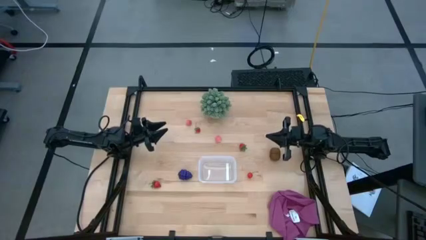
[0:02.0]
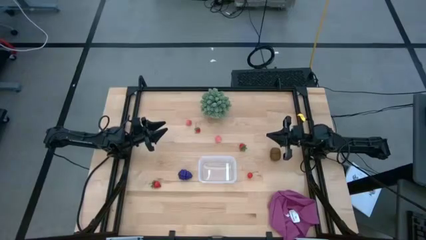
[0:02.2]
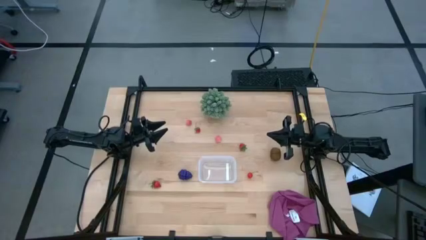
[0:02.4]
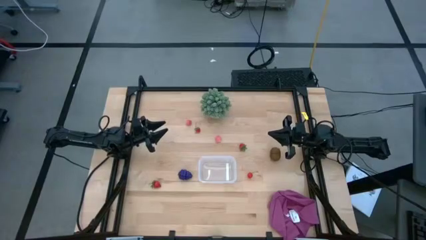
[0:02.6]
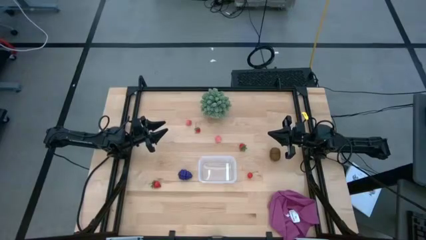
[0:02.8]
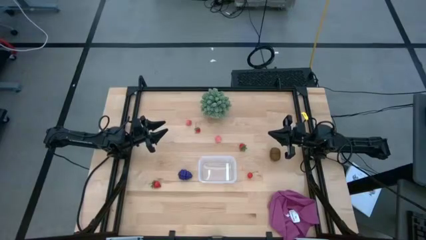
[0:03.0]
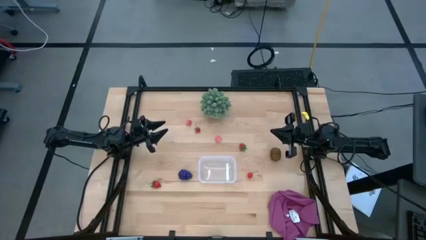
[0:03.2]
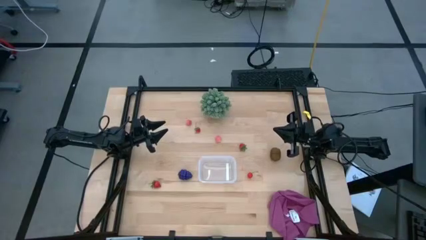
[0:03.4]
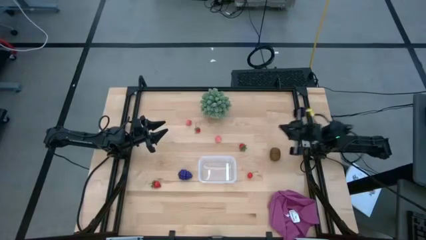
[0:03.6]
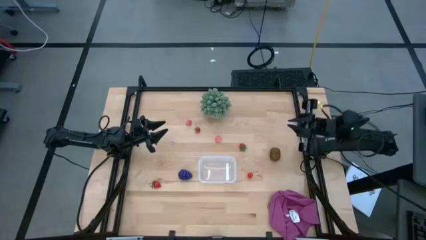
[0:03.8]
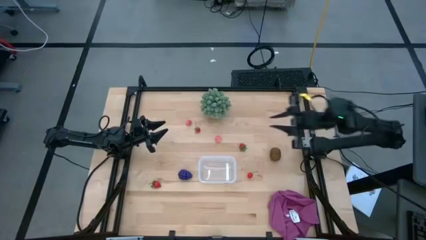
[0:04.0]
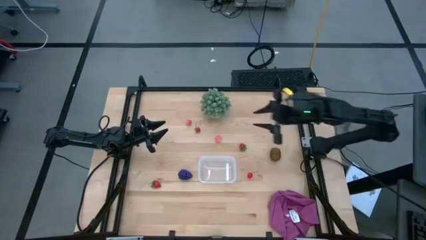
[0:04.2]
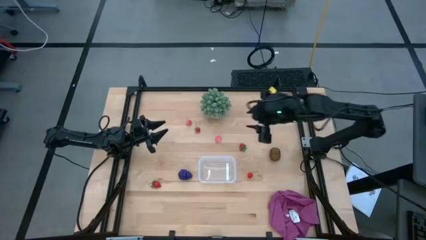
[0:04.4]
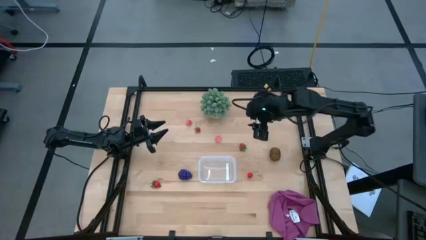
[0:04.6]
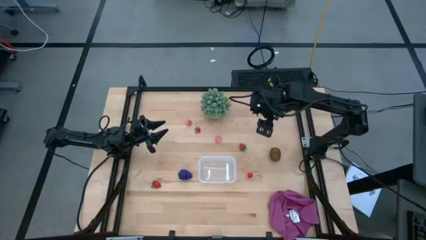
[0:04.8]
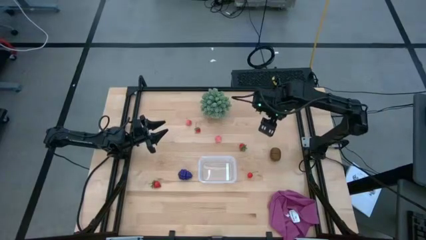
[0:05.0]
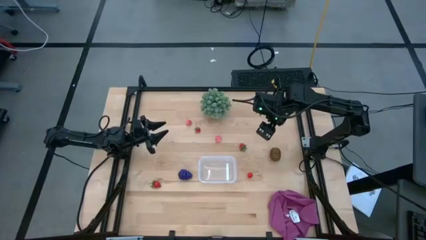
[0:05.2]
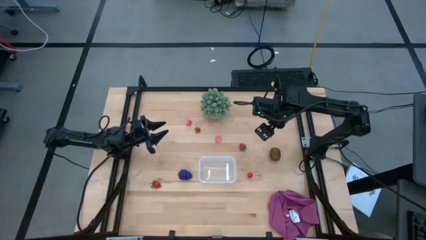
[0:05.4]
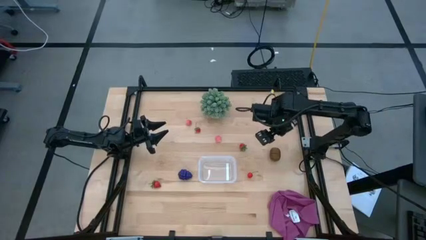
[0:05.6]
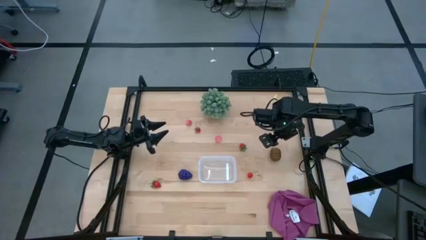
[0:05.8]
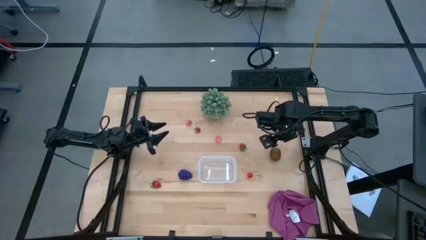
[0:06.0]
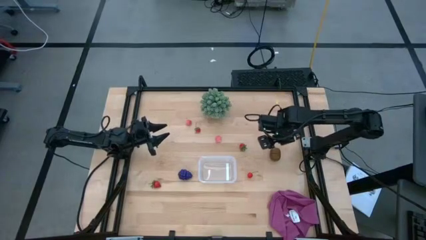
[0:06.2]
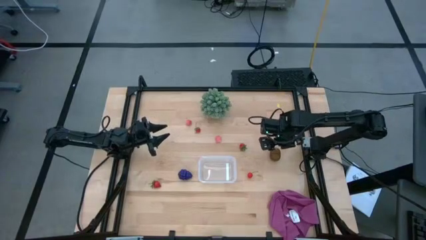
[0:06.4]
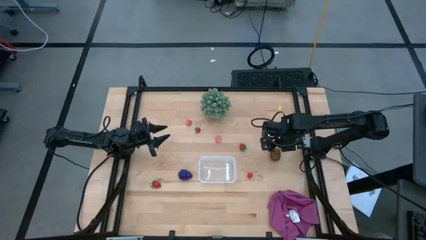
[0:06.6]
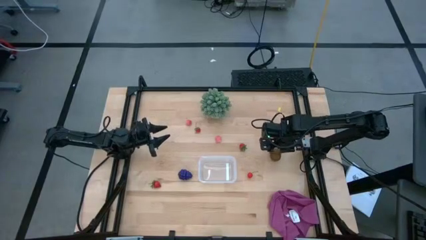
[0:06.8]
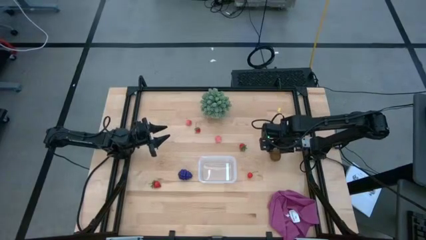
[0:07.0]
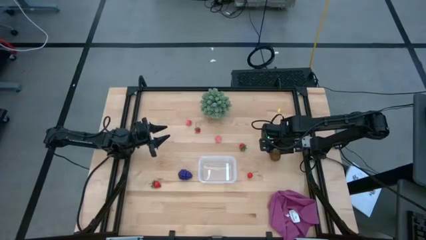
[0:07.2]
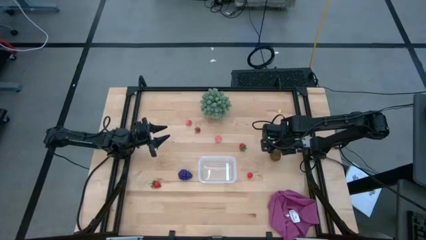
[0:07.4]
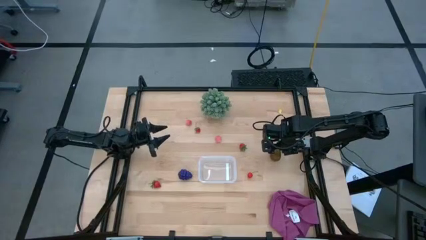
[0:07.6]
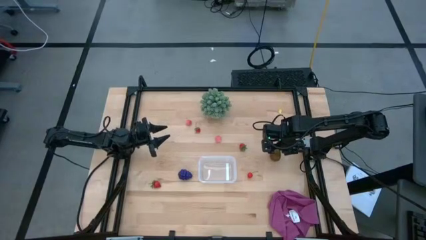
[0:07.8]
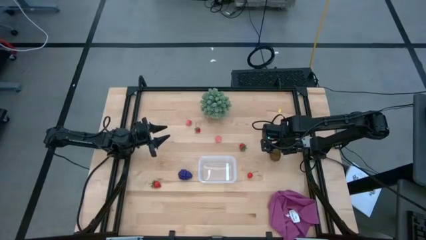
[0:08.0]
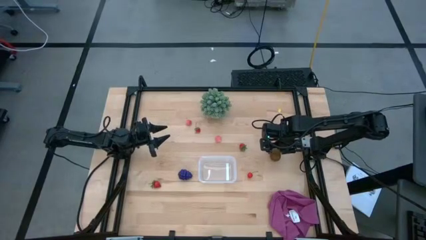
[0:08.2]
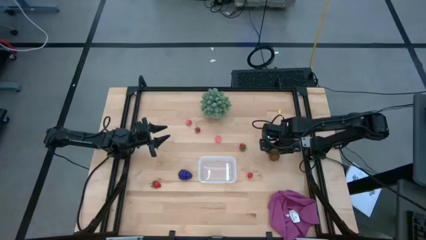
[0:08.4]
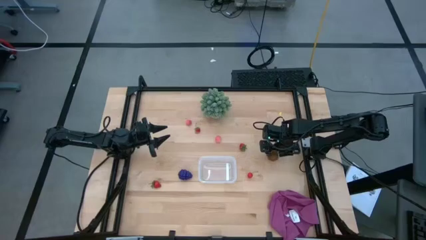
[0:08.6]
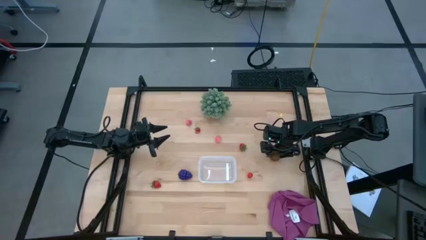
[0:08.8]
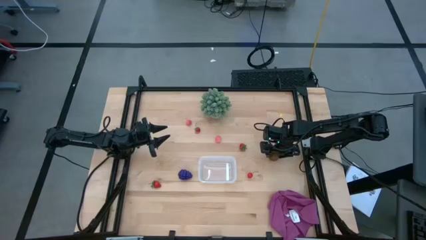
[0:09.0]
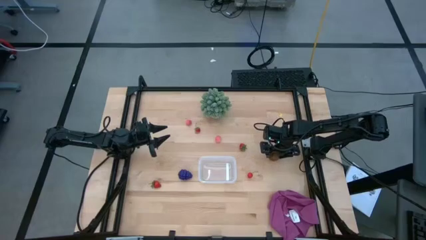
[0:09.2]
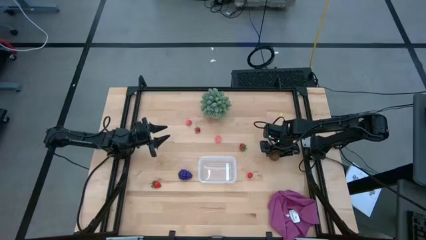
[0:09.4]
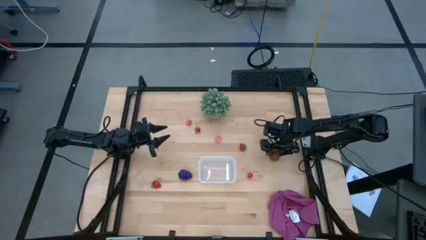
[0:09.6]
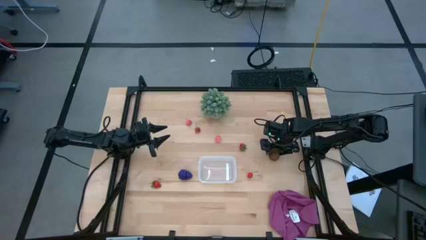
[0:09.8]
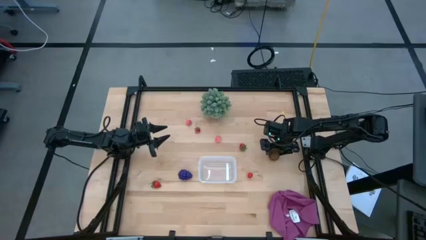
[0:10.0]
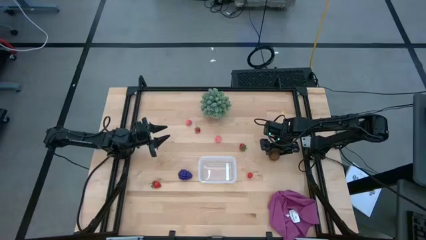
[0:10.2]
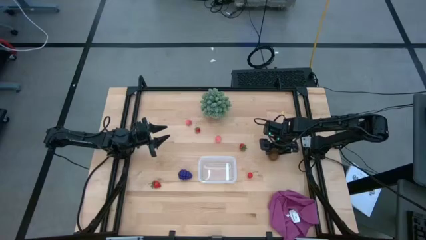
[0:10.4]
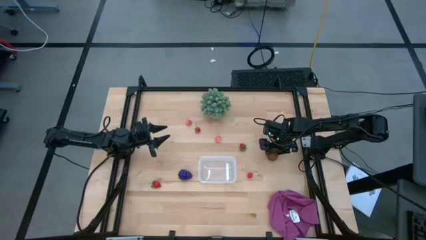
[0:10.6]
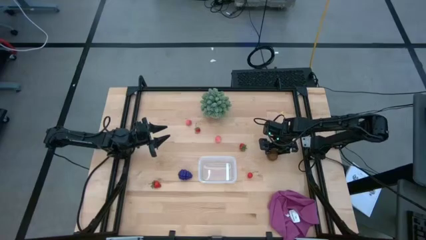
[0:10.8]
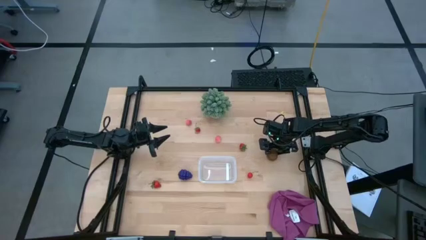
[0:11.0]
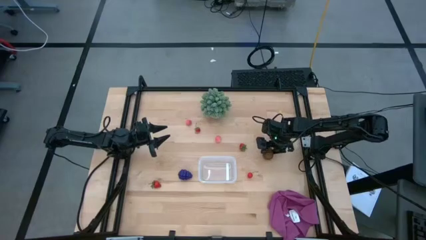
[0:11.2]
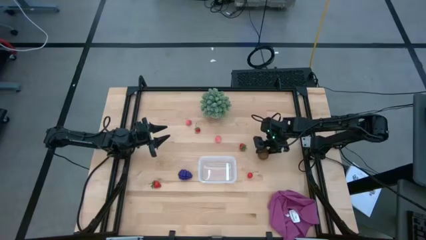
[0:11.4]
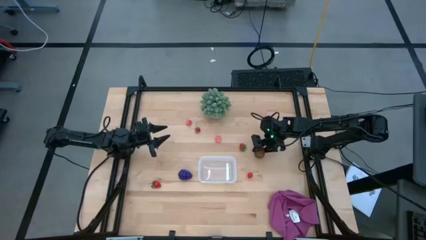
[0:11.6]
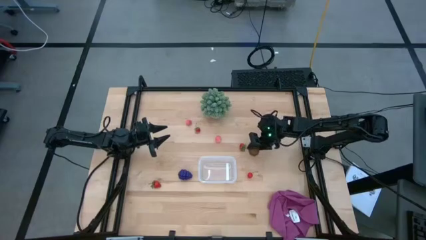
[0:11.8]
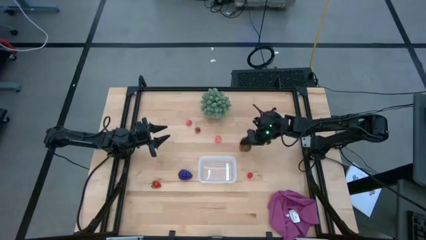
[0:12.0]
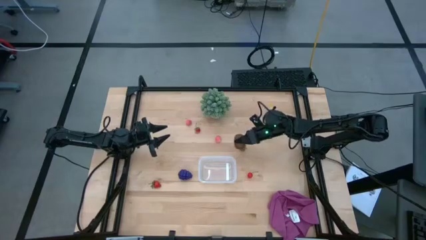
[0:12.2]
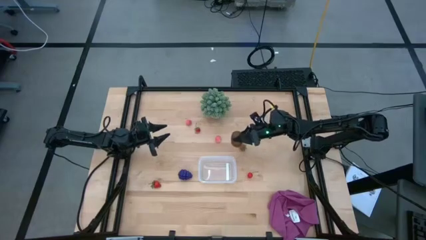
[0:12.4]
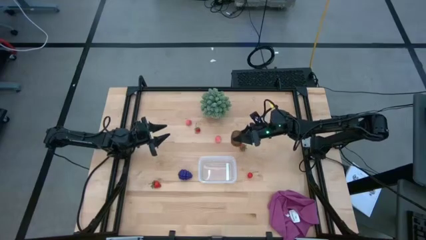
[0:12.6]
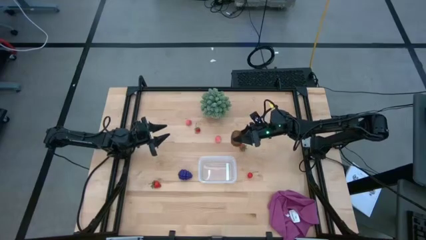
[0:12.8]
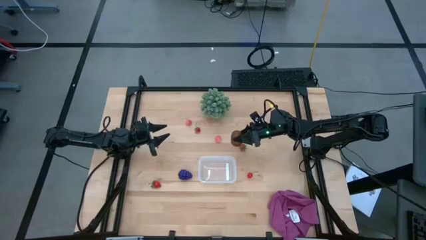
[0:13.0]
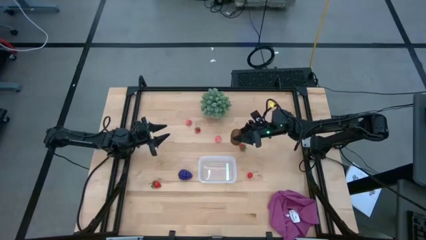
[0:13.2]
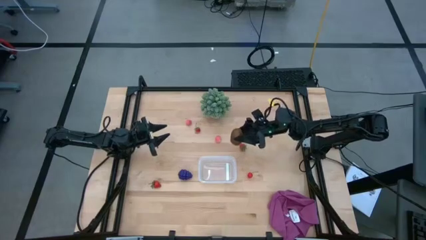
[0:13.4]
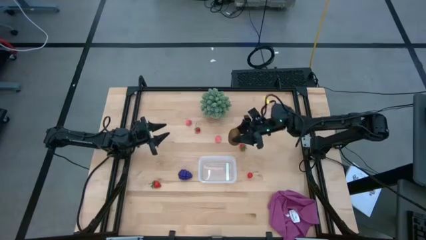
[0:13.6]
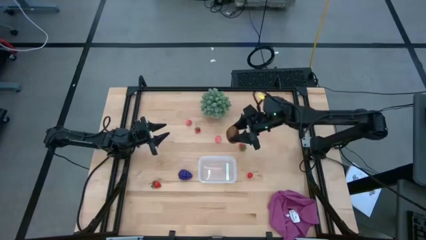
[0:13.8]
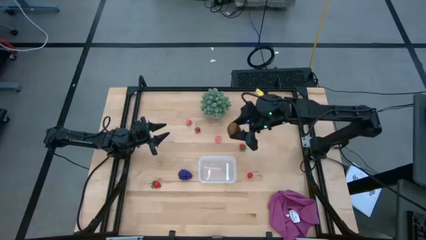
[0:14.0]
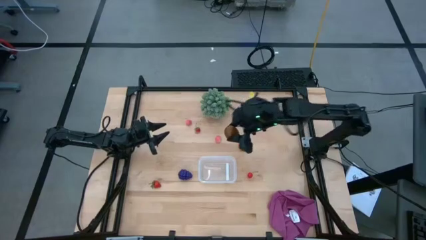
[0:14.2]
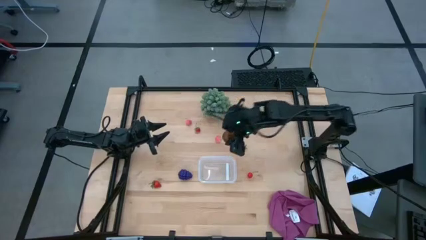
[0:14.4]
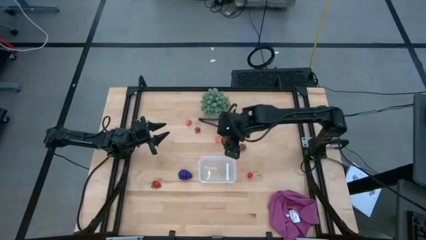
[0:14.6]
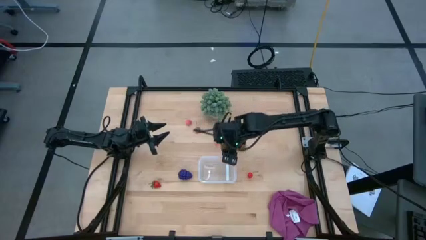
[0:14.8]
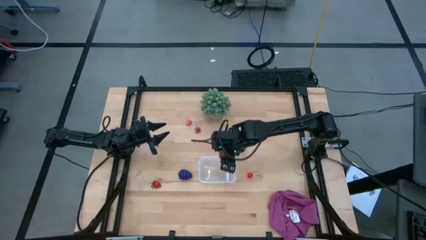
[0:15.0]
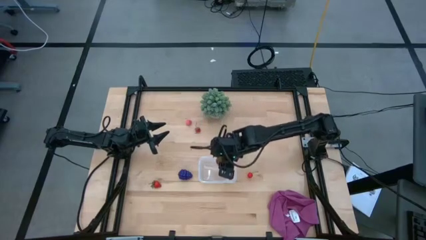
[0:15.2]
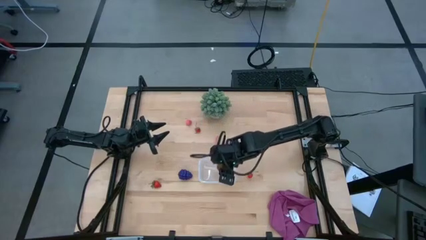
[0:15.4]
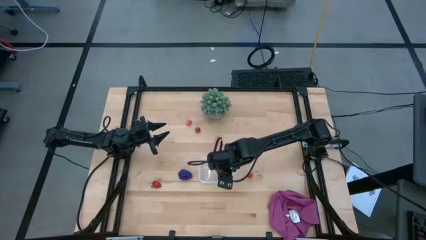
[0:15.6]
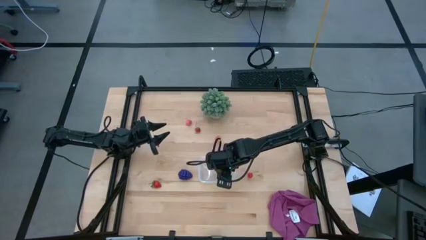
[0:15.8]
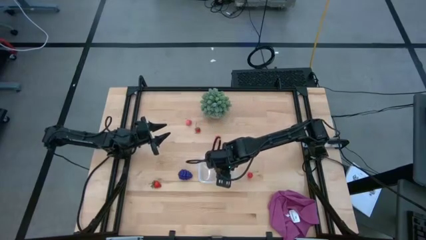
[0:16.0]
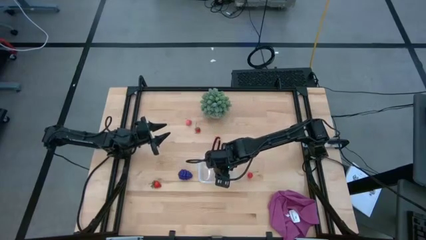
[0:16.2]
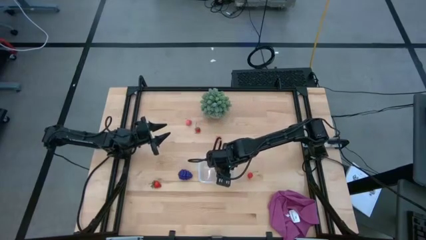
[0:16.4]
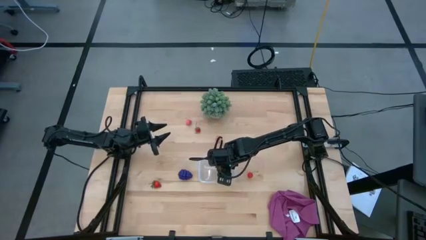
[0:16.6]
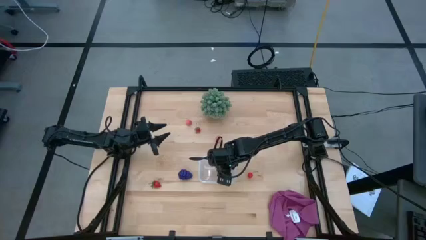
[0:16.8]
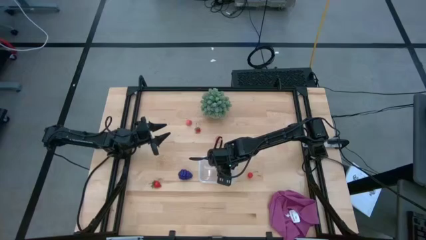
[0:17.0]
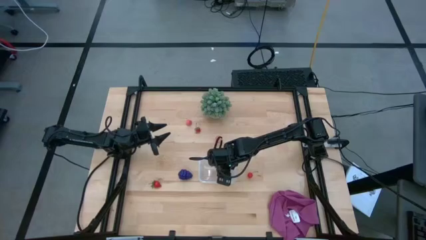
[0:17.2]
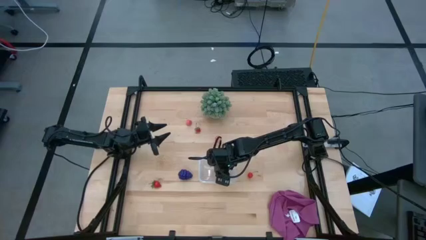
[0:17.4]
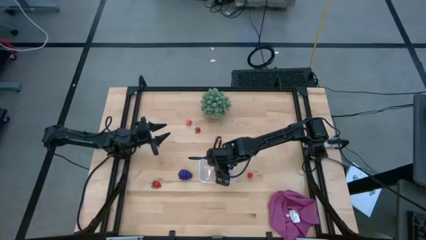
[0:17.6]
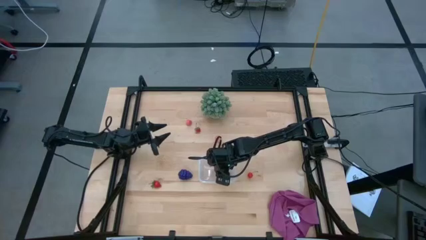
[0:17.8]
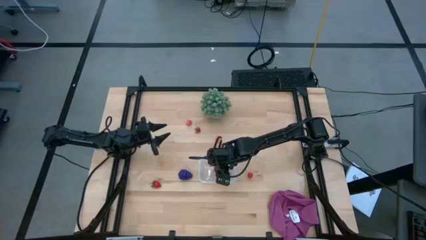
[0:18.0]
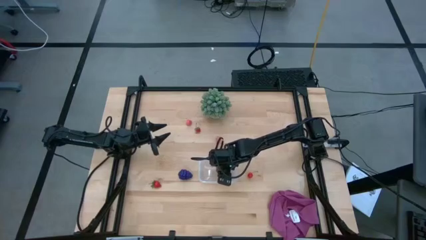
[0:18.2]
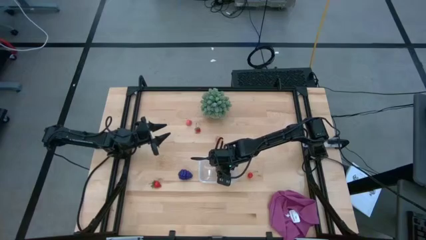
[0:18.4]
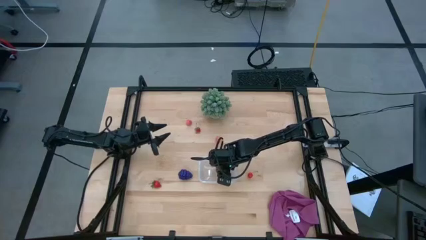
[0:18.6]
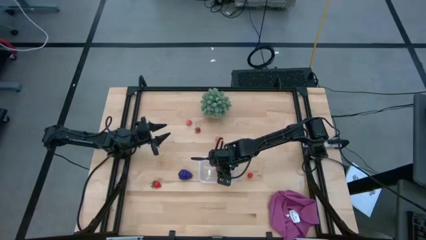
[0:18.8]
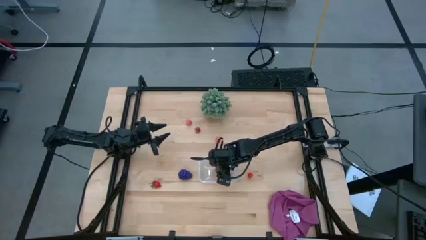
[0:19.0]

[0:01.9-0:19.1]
Task: Pick and placing Produce into tupperware
Put the brown kiwi into the bin
